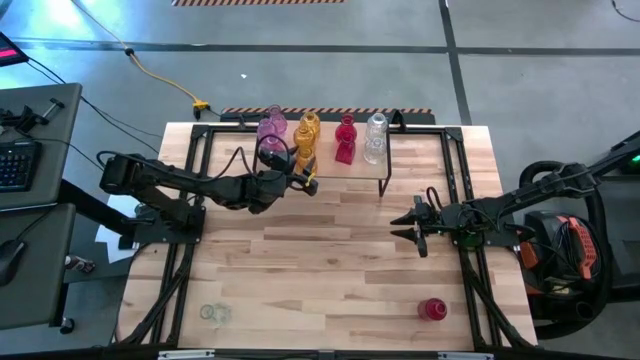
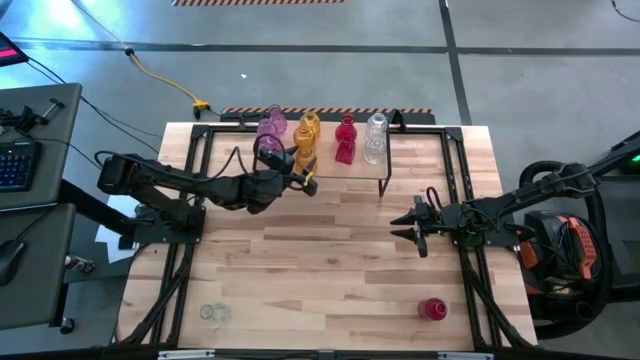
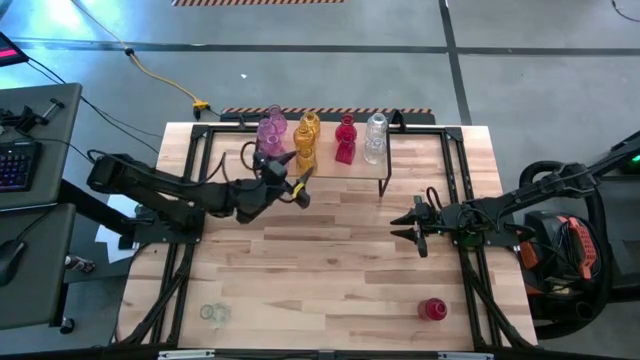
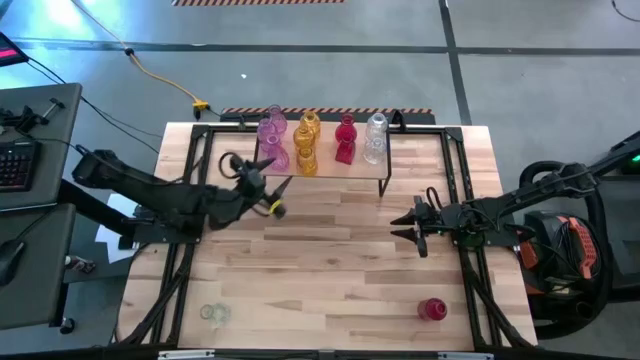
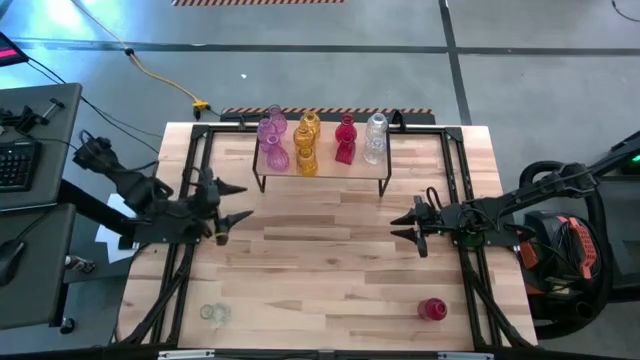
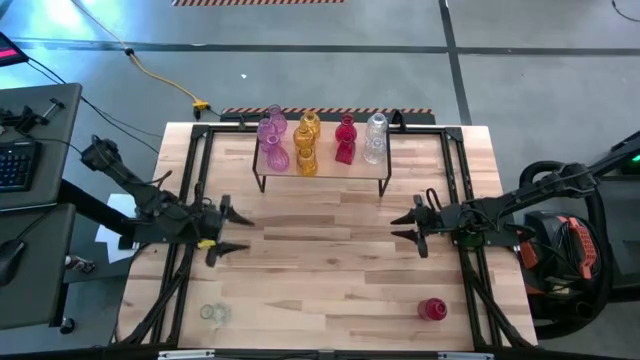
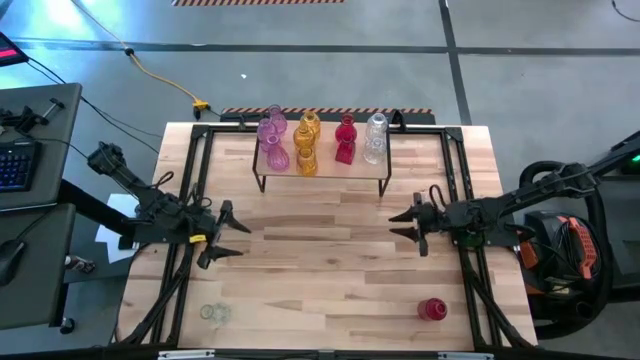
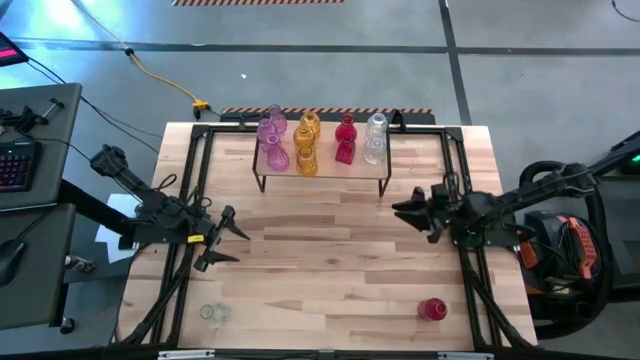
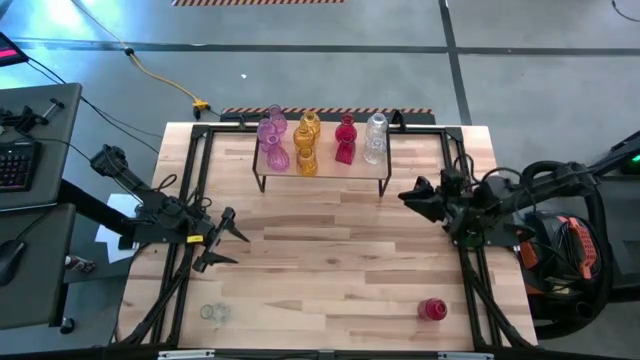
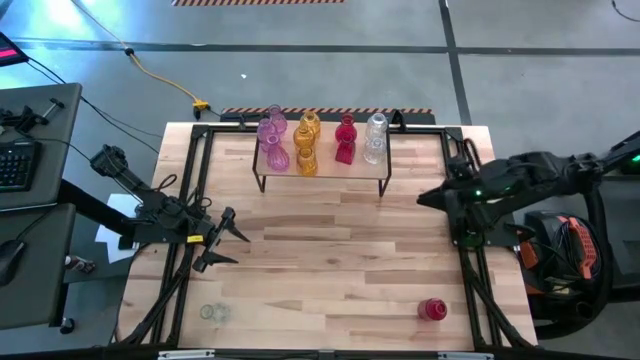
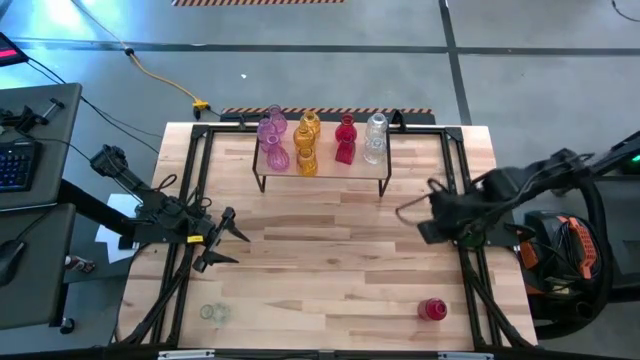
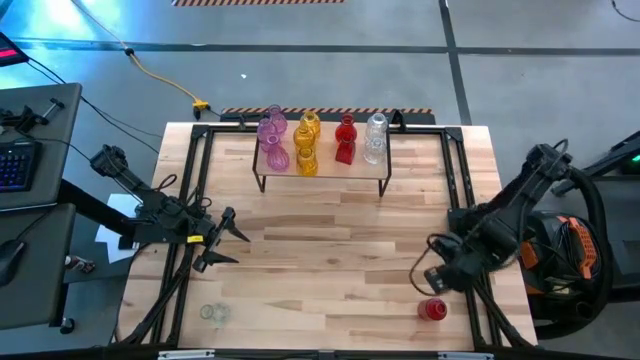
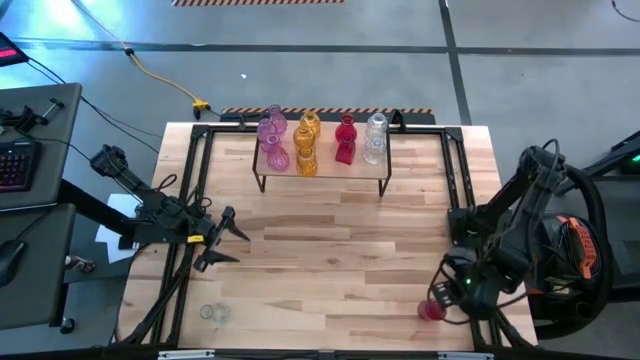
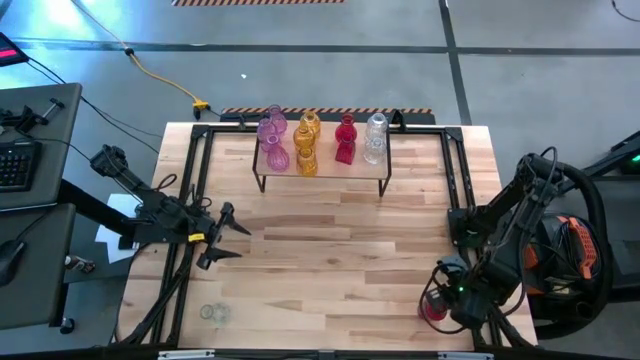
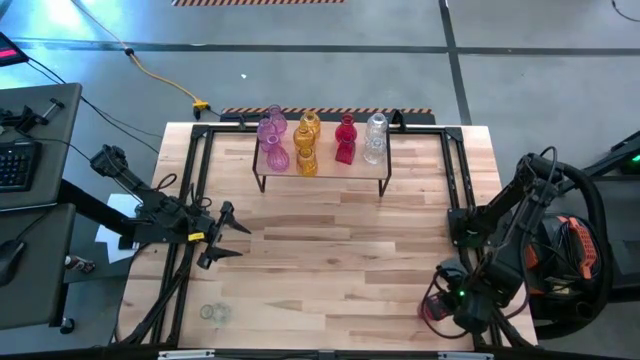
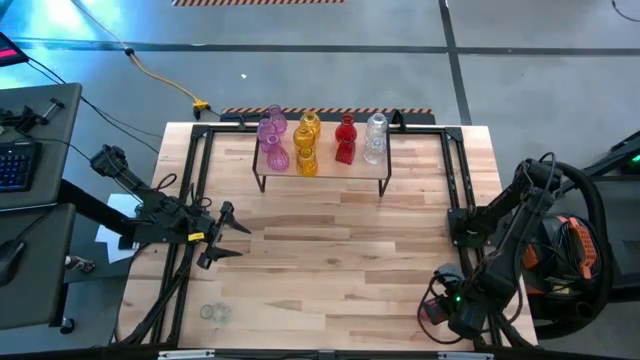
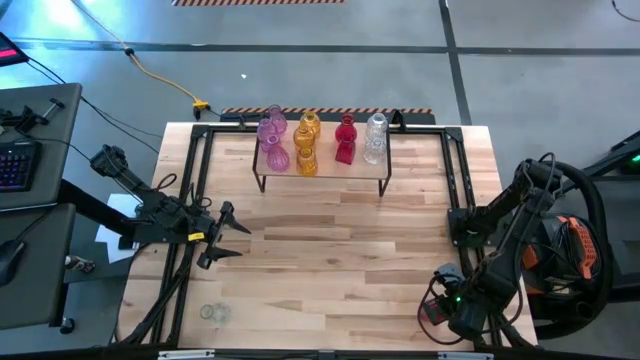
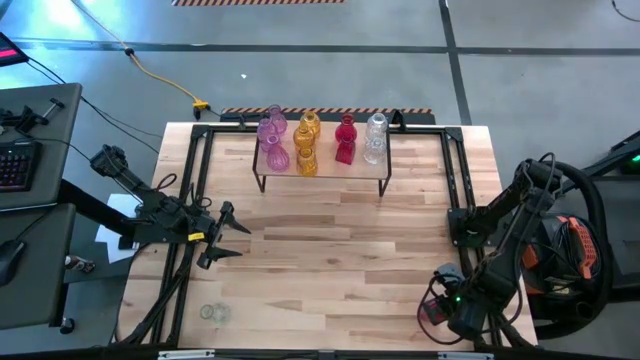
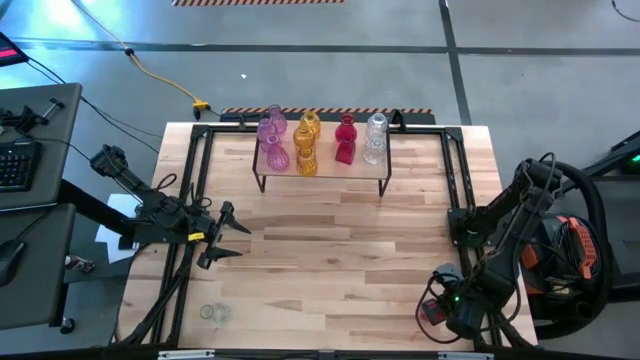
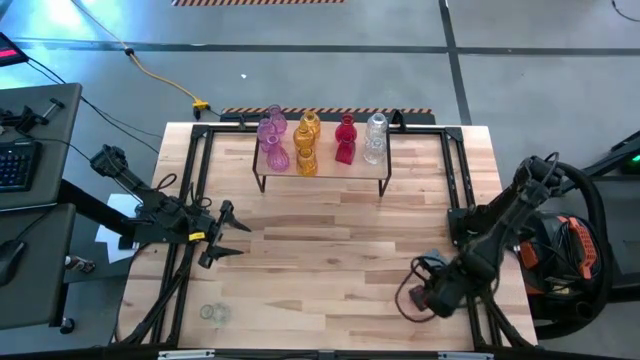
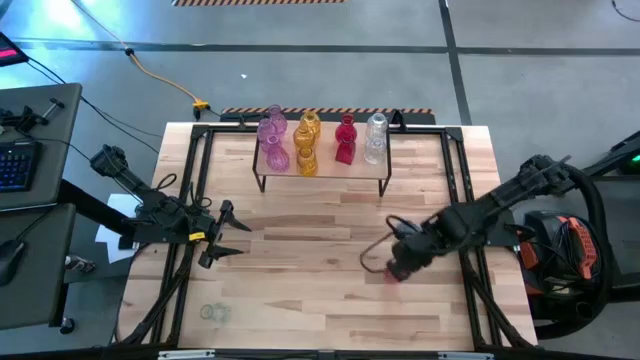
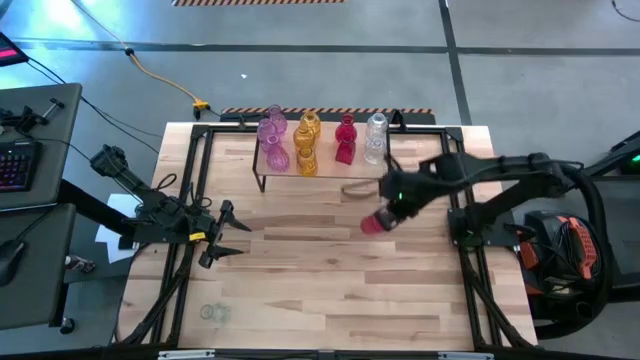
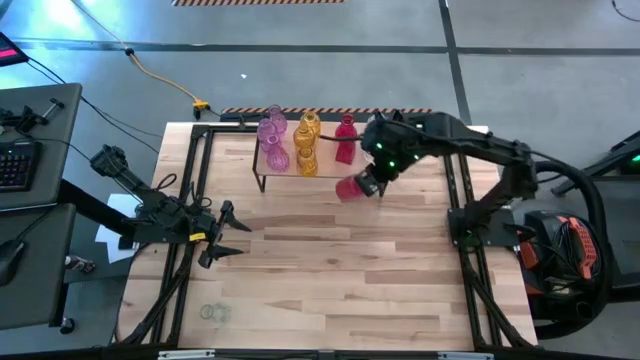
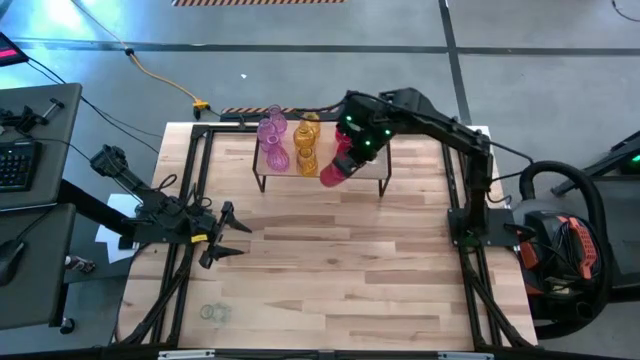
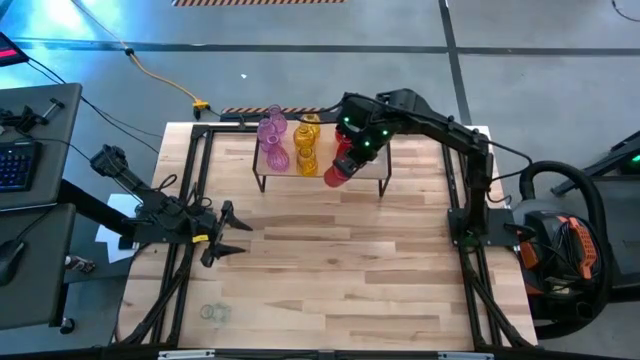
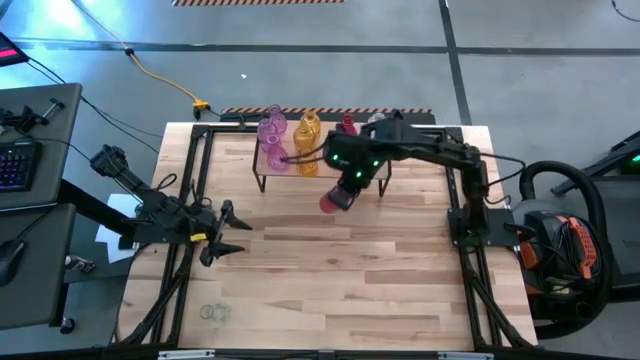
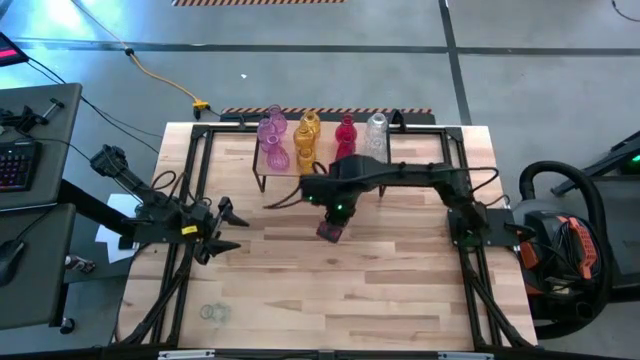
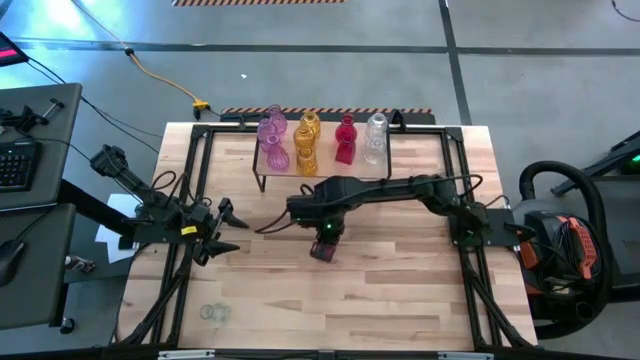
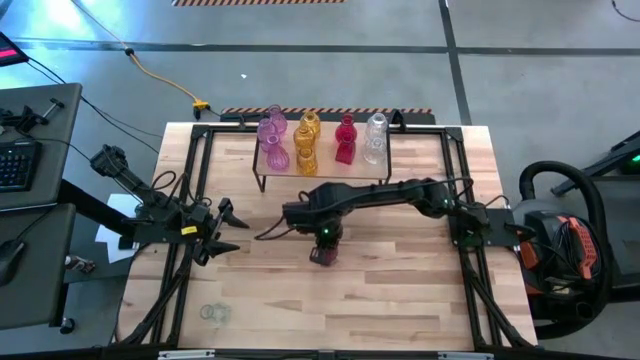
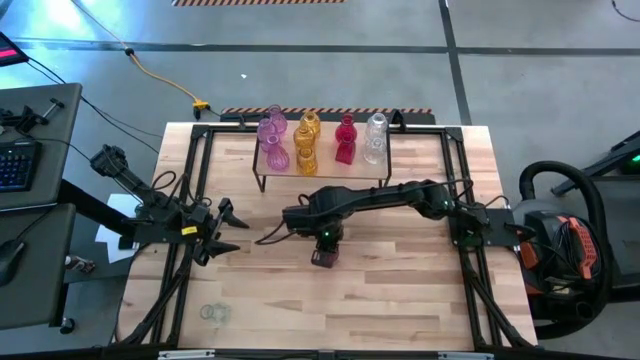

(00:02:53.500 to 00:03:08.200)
Task: sort vases onto shelf
Put the red vase on the shelf aligned with the other red vases

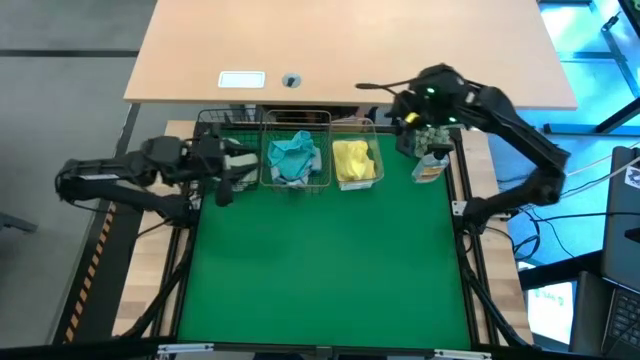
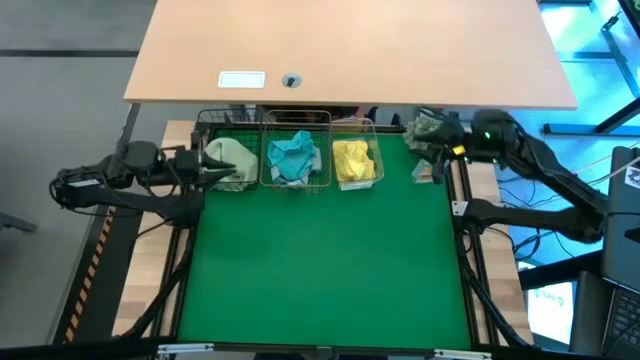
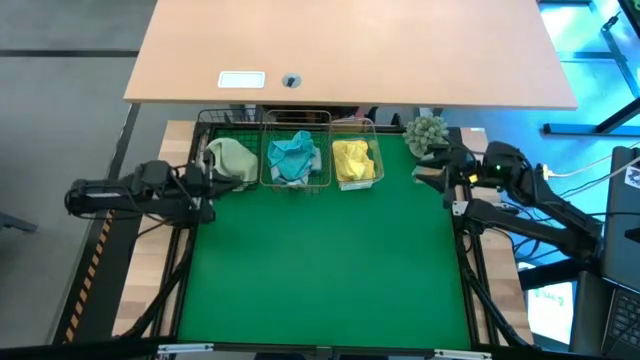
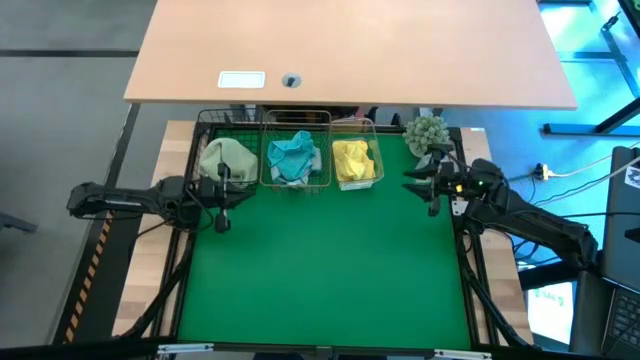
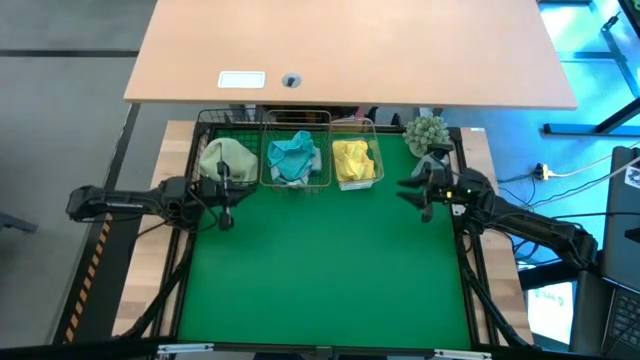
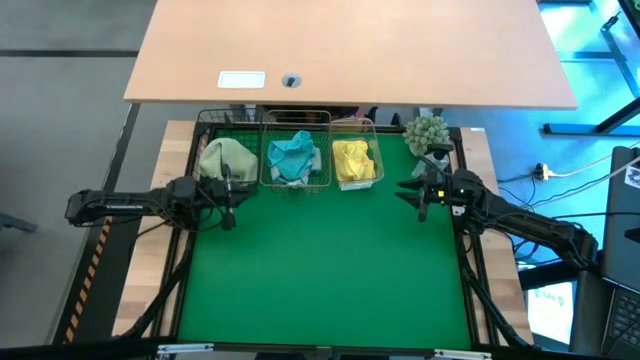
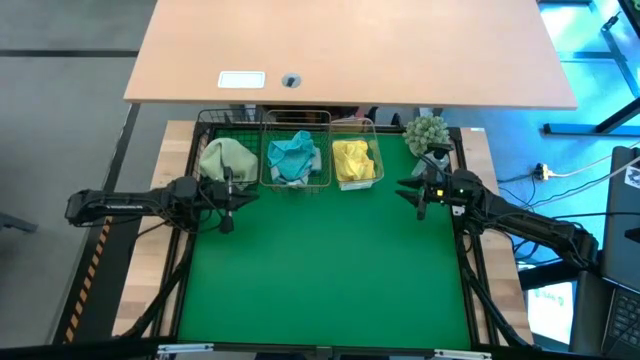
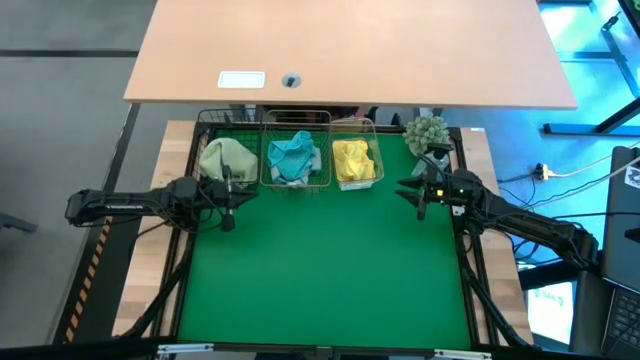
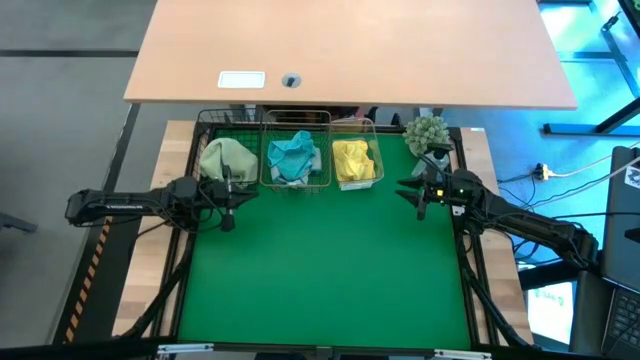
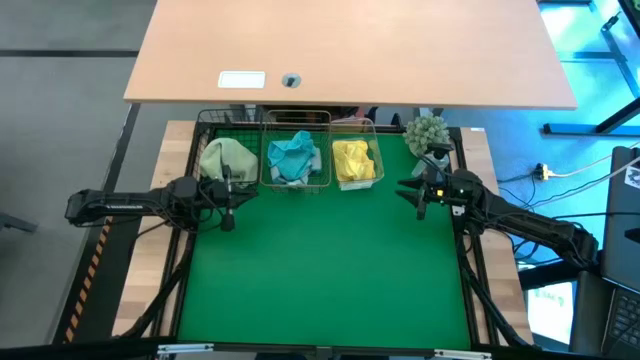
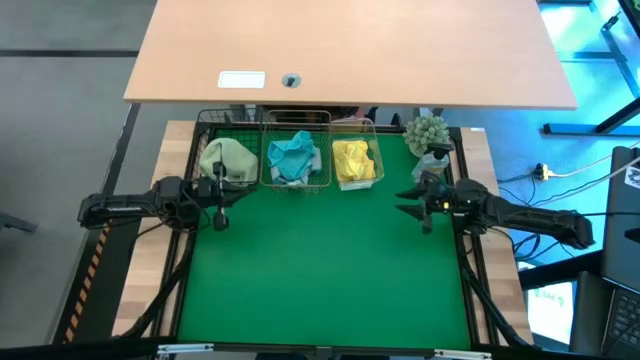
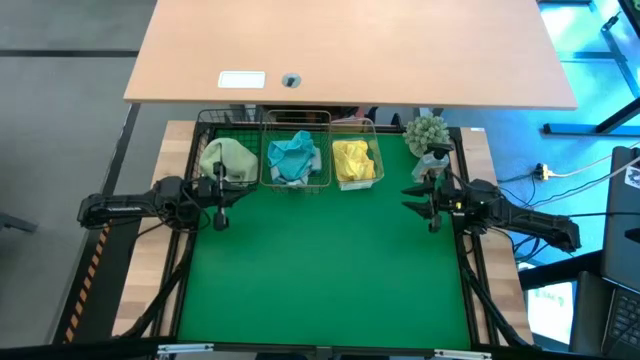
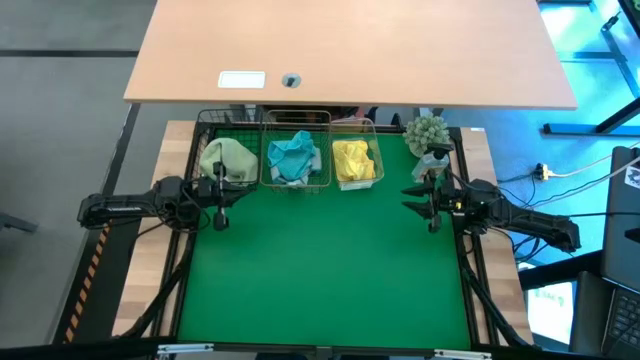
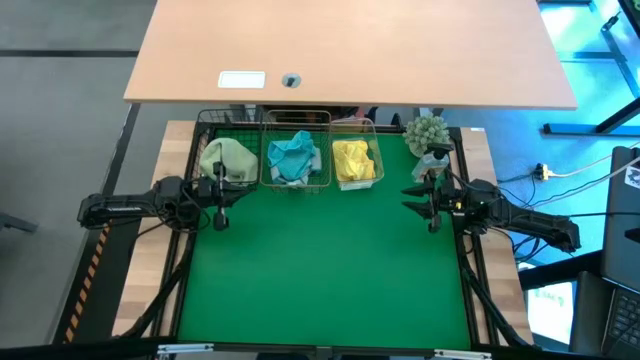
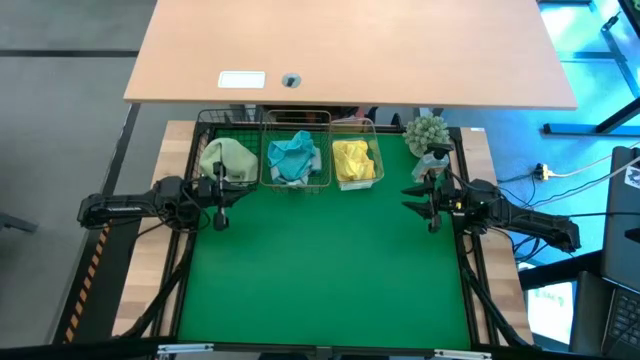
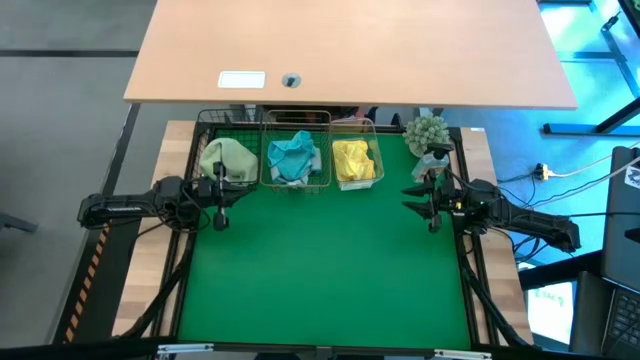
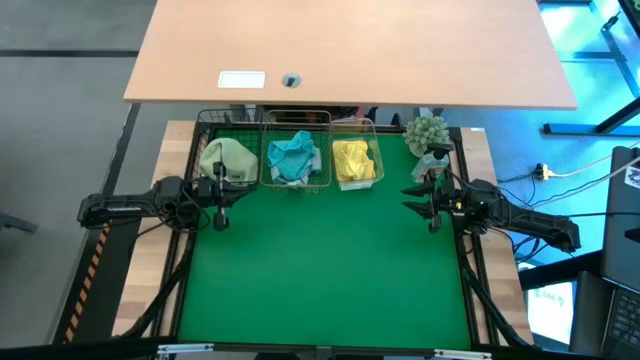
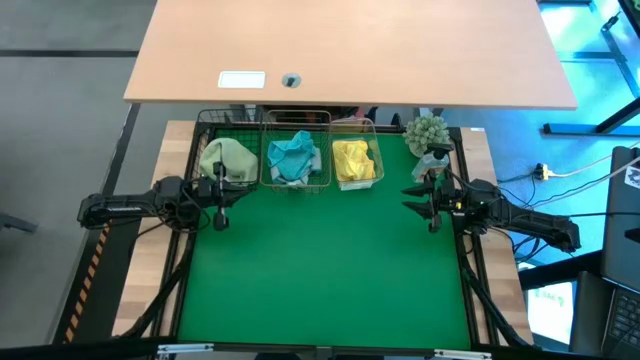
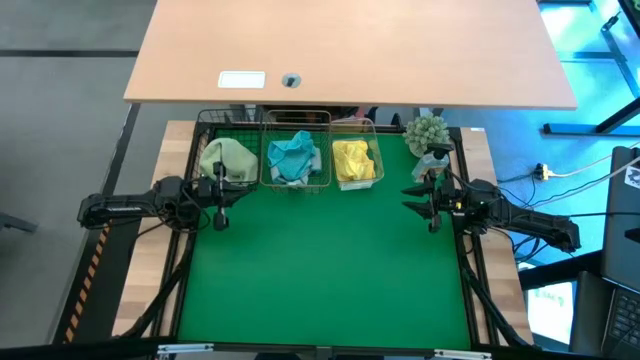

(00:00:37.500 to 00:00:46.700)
Task: Sort microfiber towel by color & place in baskets
Return to Home Position
